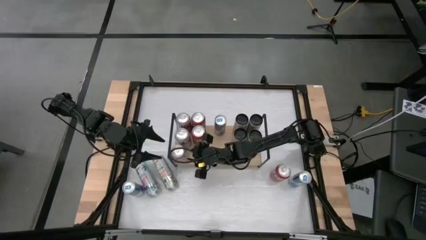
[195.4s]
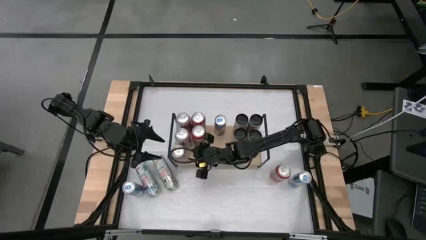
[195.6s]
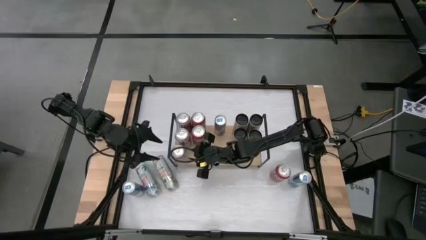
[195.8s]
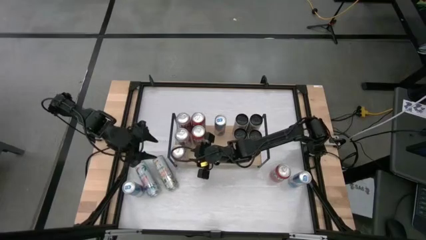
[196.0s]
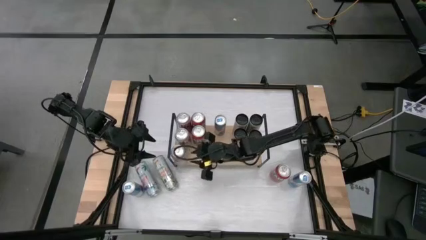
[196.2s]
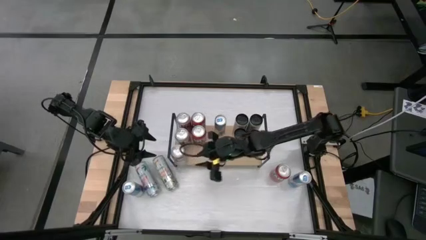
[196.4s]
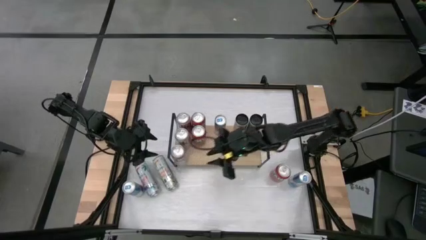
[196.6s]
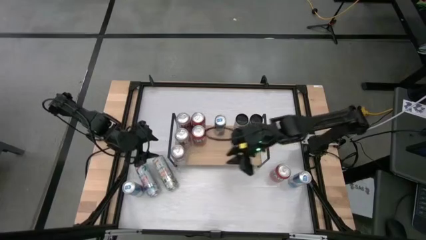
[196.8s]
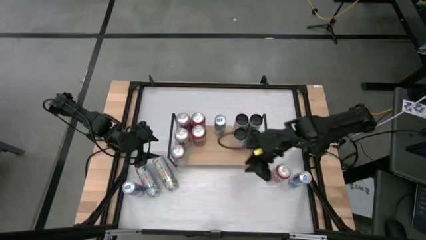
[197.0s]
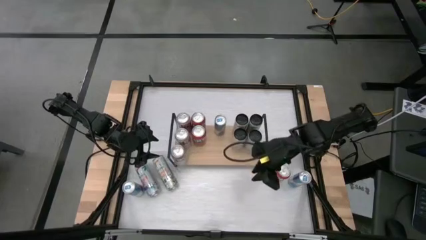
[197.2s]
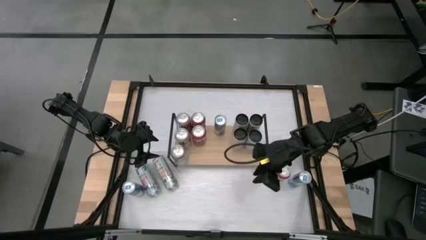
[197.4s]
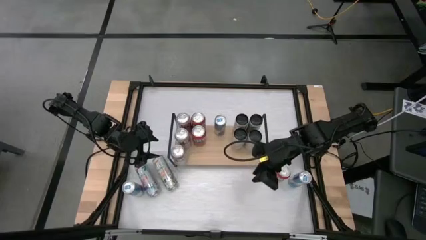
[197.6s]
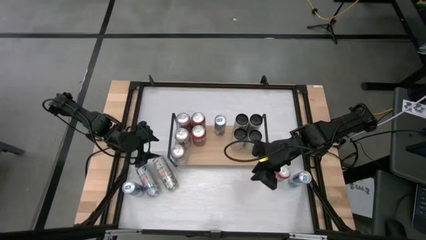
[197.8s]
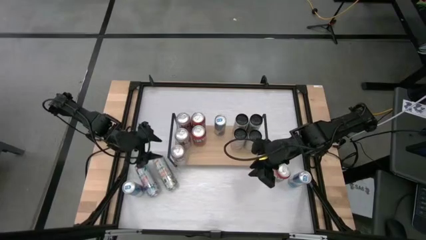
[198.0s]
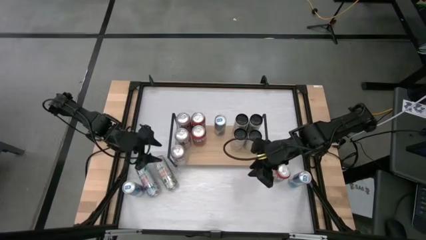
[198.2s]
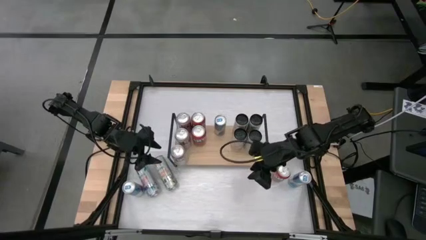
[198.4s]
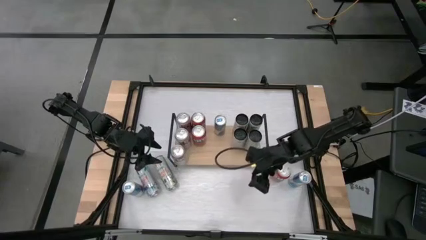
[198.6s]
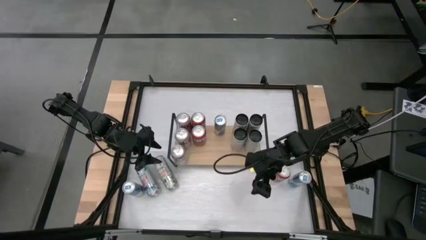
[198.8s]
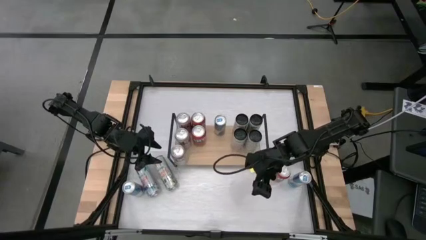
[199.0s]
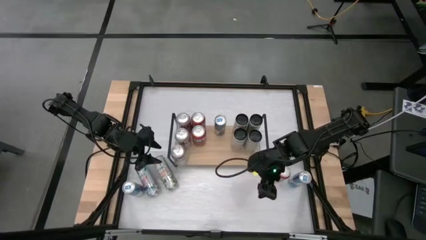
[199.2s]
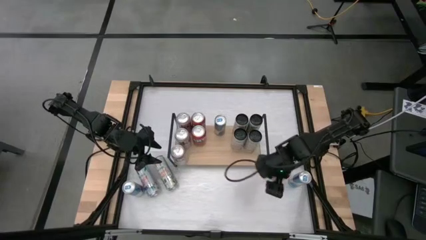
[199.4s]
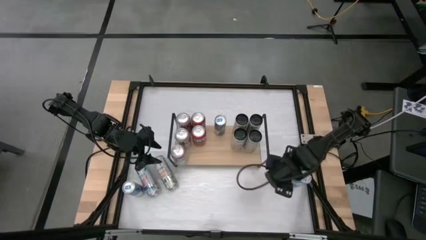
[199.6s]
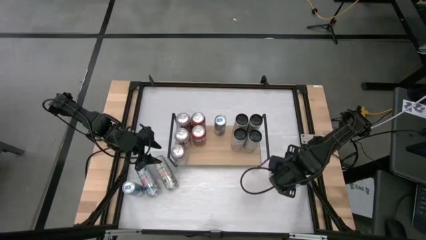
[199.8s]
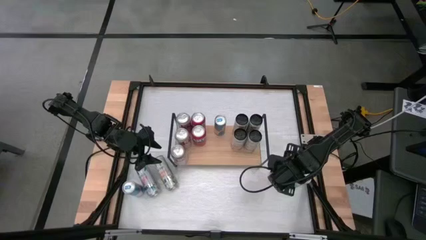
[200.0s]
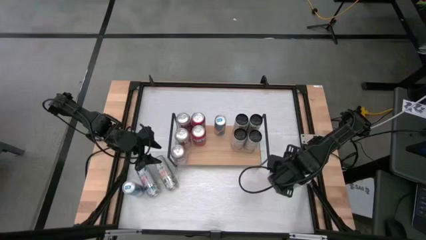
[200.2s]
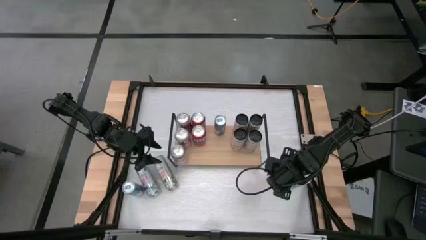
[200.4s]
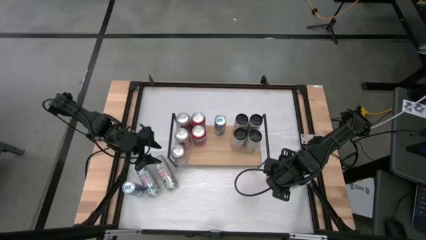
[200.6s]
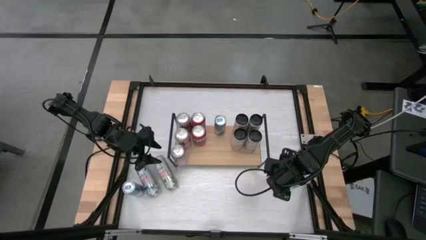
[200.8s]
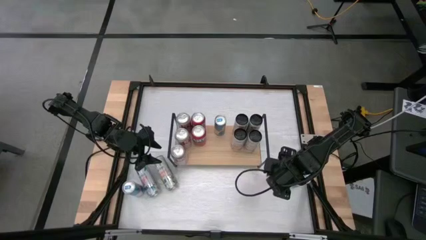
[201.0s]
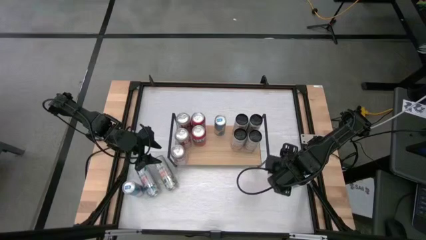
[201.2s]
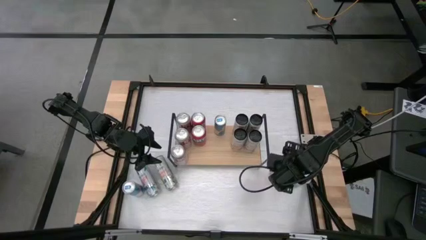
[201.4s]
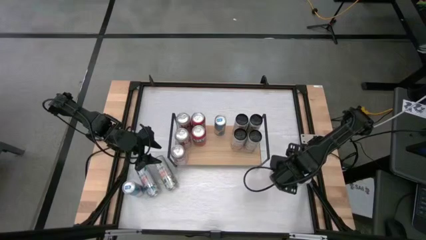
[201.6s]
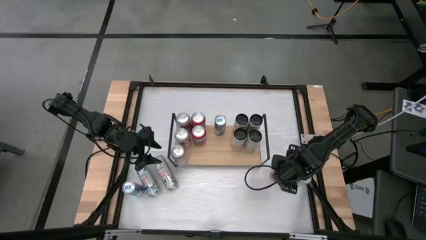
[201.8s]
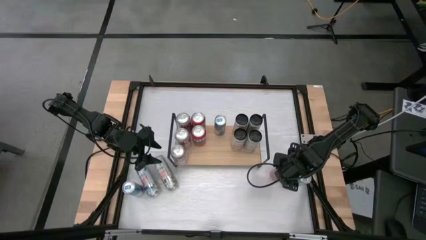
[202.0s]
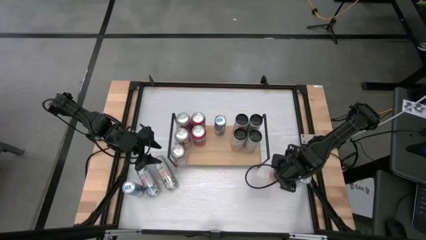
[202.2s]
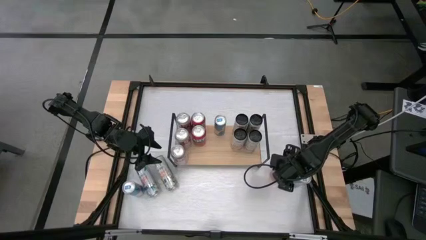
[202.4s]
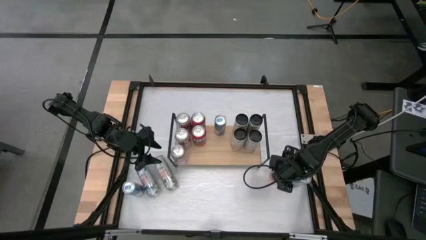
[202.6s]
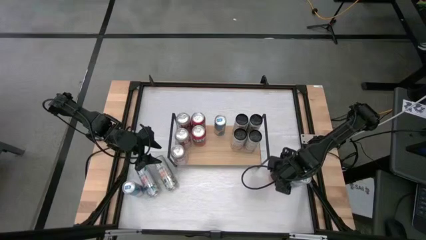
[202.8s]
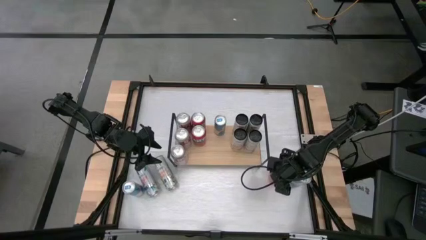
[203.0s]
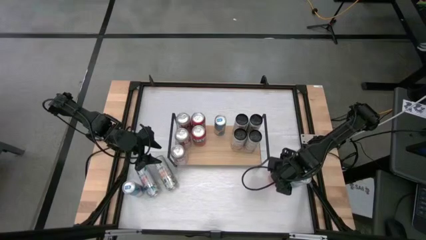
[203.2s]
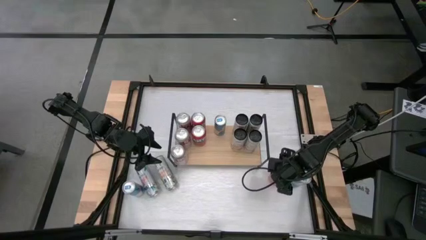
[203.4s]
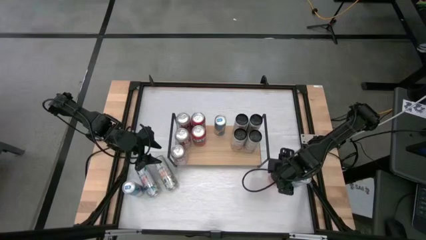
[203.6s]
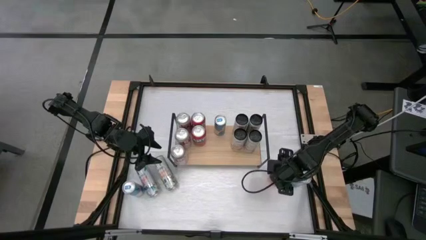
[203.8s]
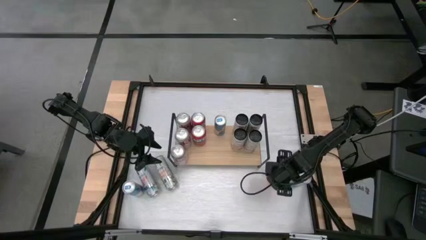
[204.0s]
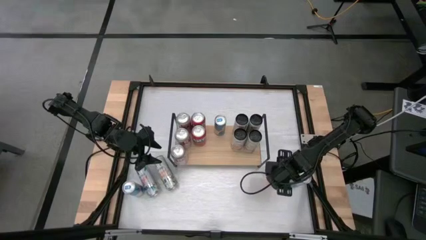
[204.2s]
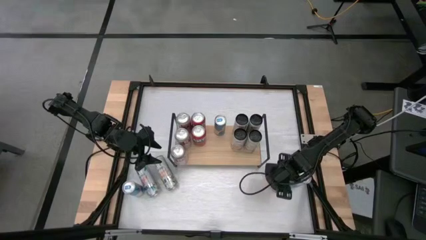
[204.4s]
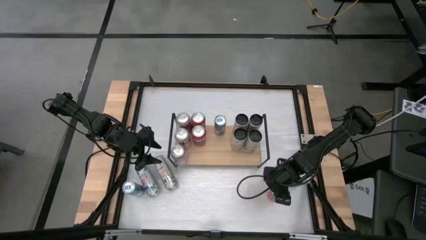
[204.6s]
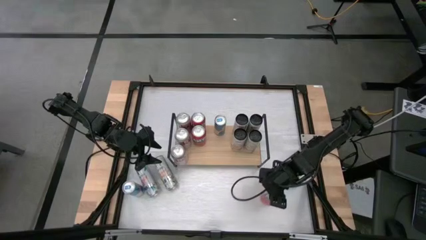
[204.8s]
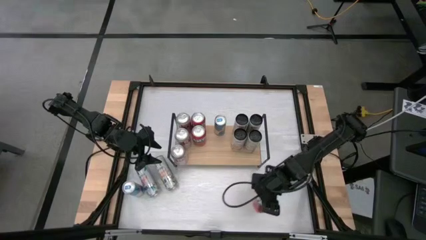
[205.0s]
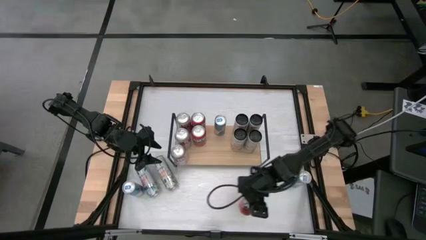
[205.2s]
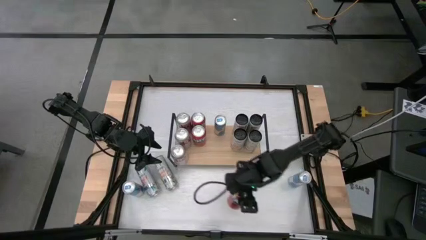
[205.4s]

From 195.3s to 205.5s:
Task: Place canned beverage on shelf
Put the red soda can on the shelf aligned with the other red soda can
